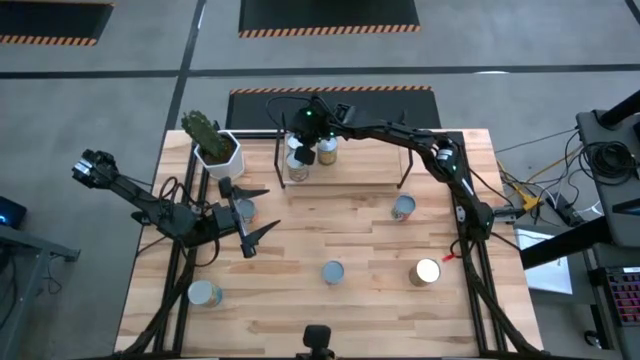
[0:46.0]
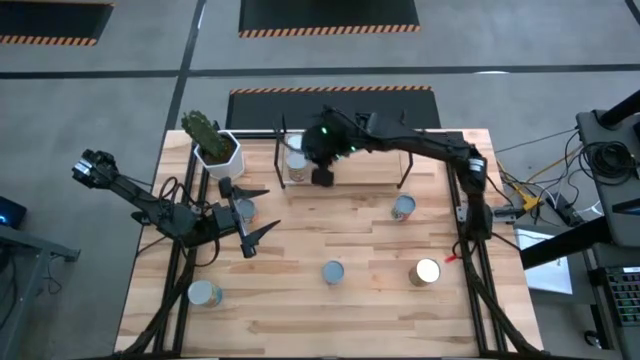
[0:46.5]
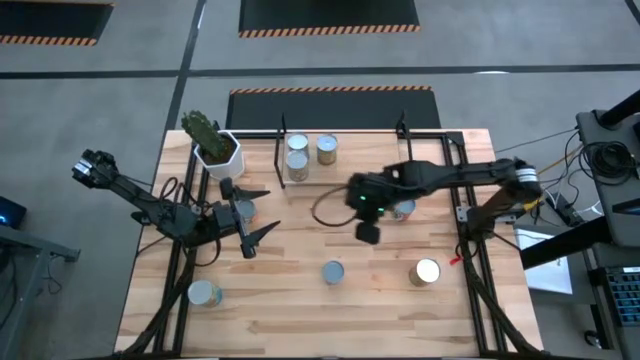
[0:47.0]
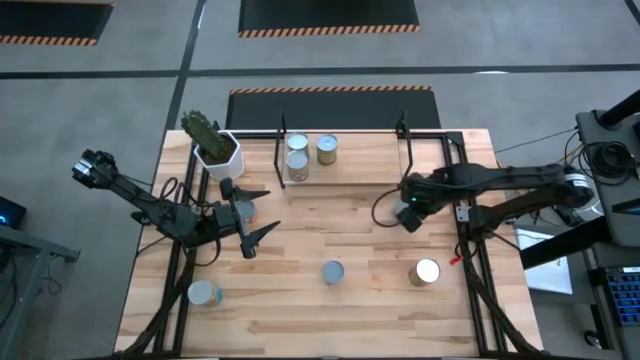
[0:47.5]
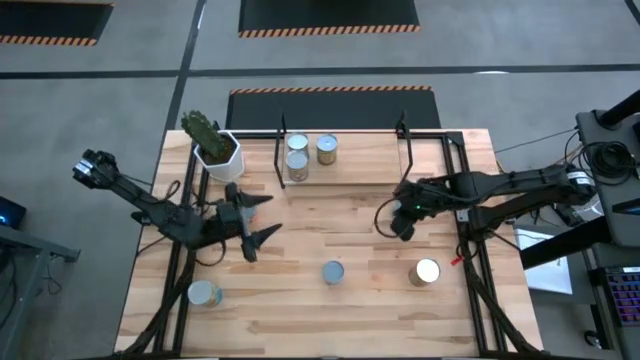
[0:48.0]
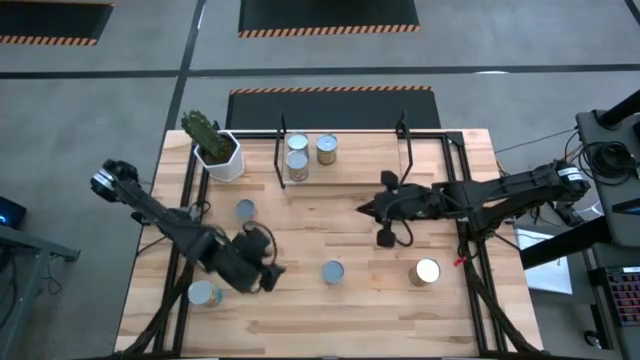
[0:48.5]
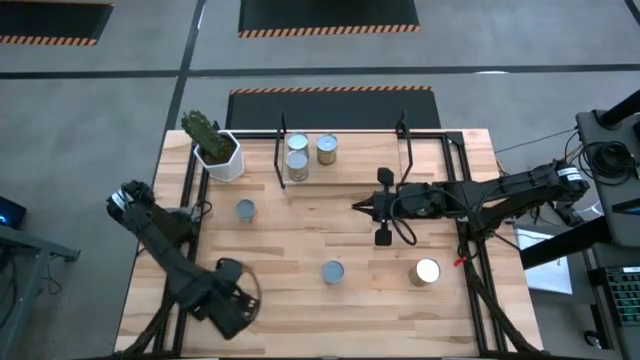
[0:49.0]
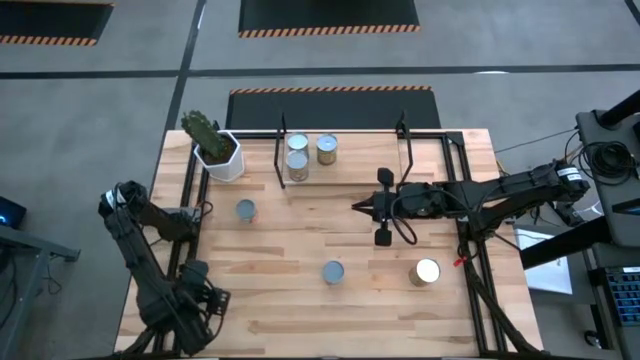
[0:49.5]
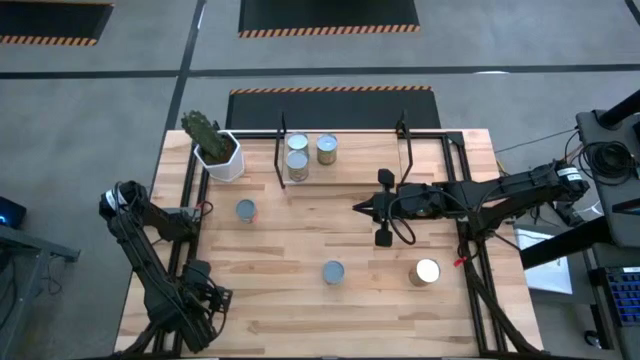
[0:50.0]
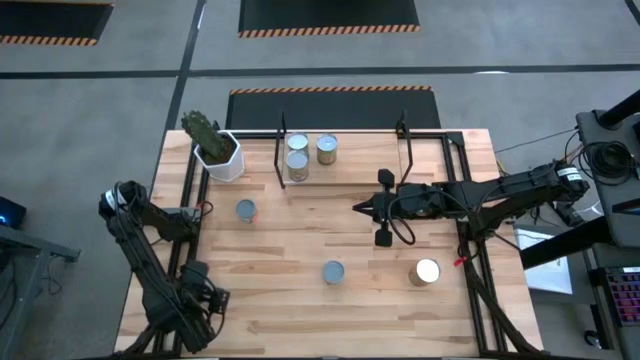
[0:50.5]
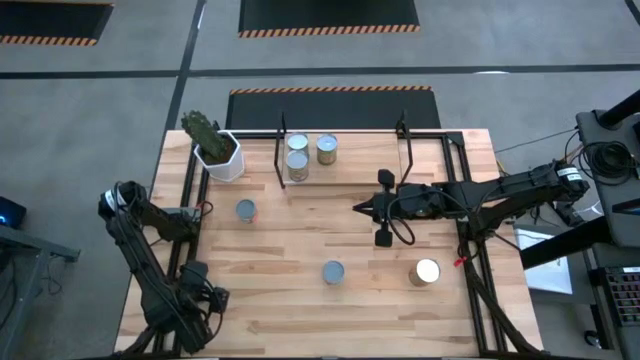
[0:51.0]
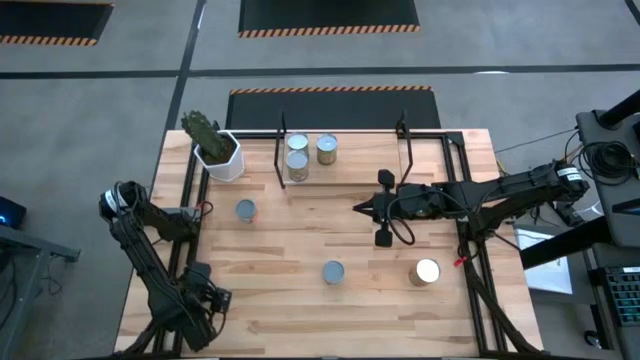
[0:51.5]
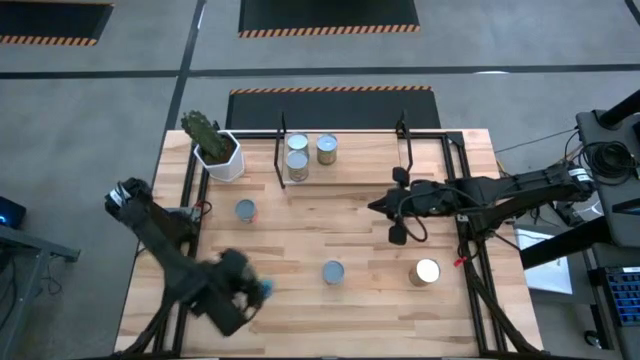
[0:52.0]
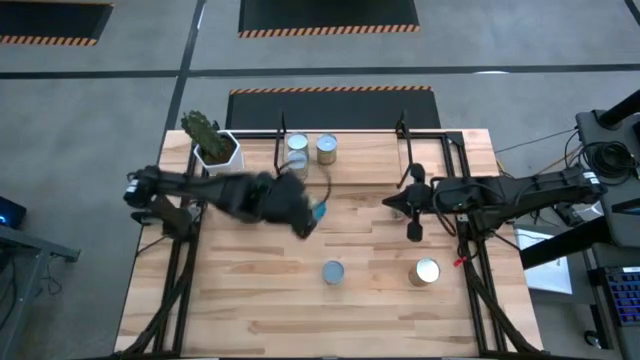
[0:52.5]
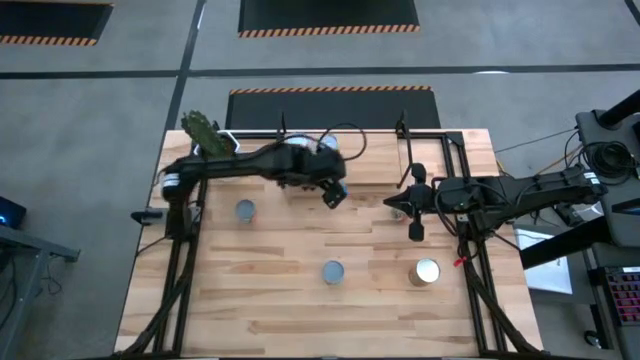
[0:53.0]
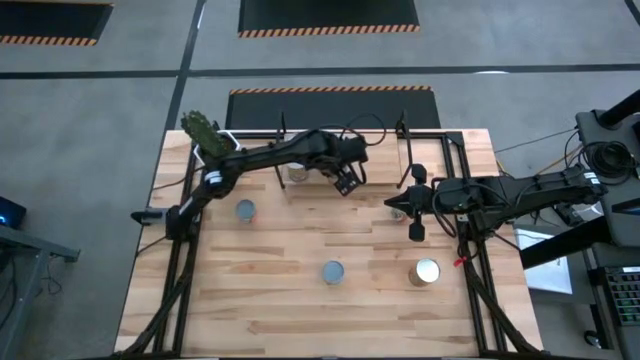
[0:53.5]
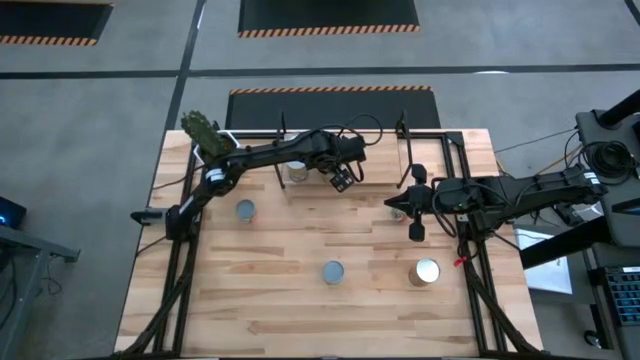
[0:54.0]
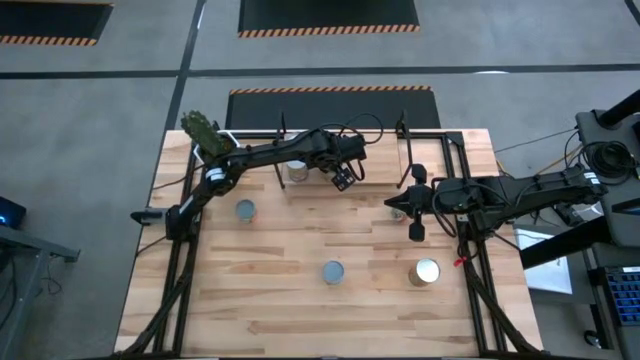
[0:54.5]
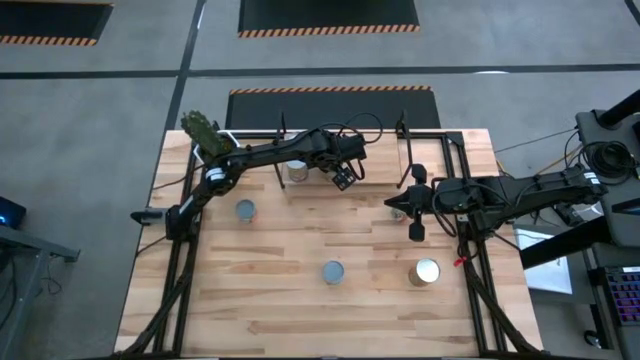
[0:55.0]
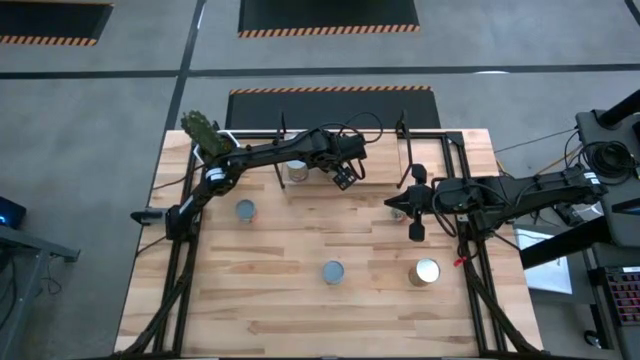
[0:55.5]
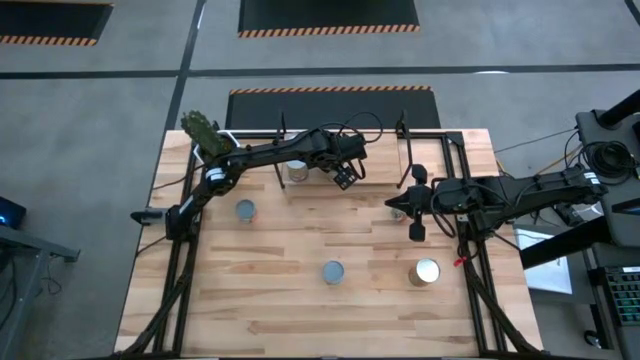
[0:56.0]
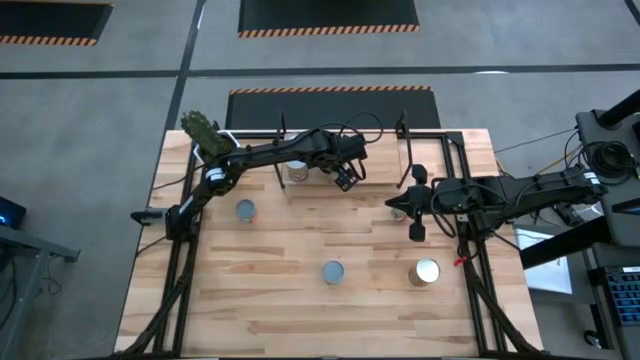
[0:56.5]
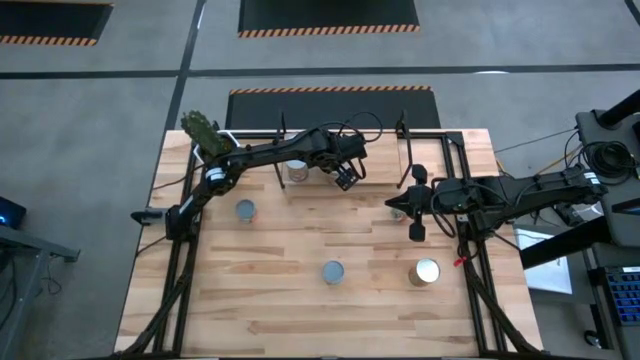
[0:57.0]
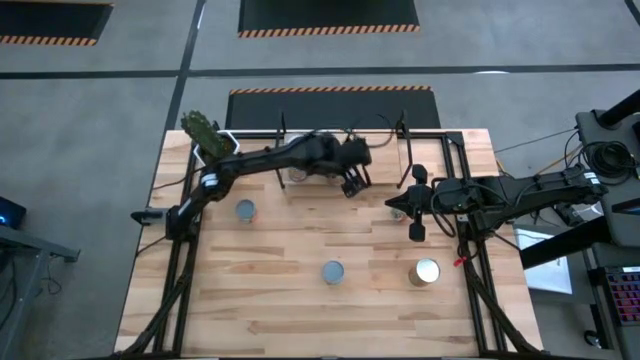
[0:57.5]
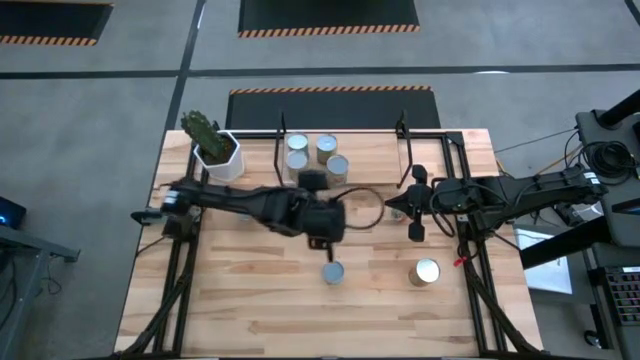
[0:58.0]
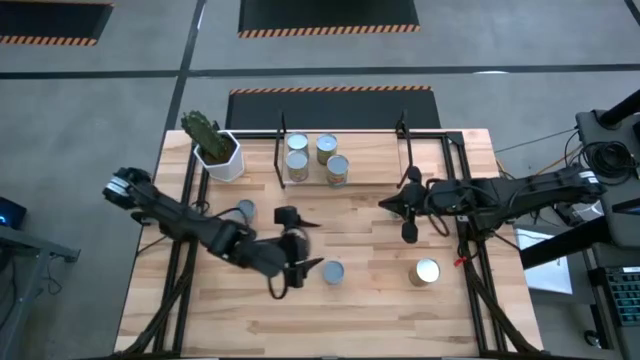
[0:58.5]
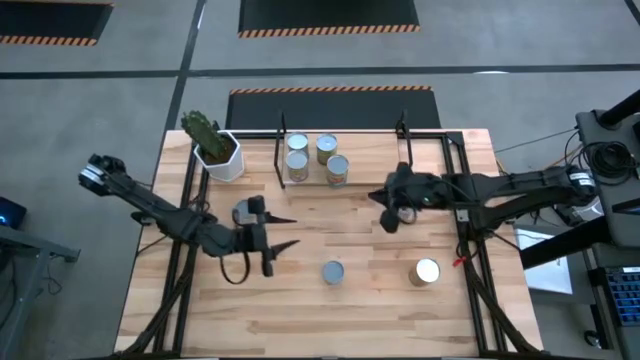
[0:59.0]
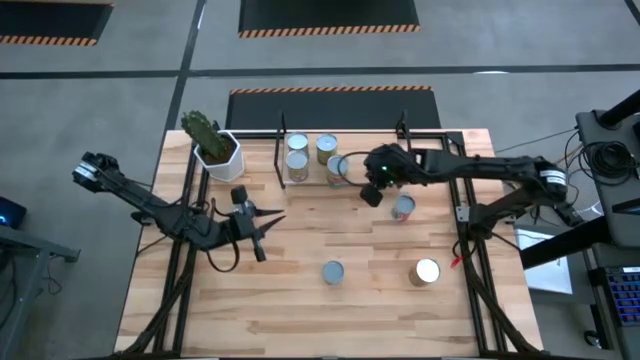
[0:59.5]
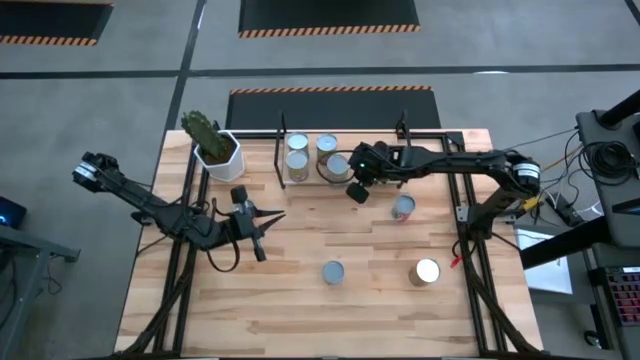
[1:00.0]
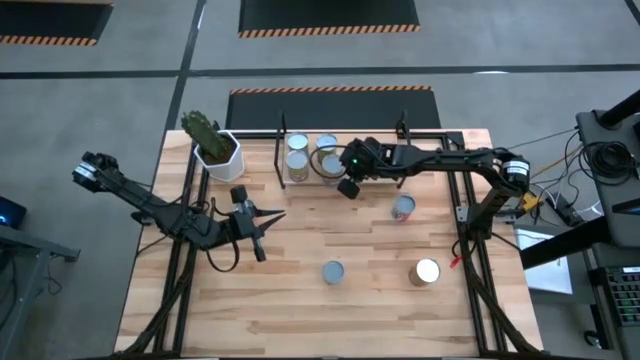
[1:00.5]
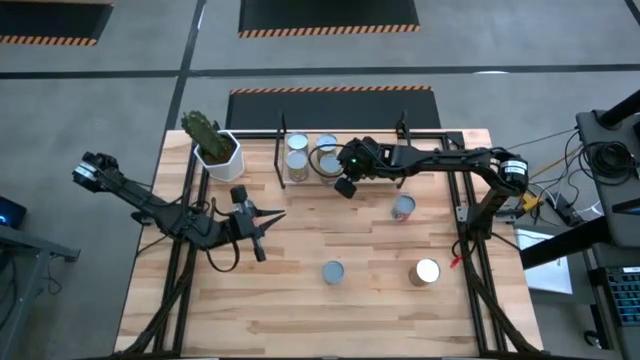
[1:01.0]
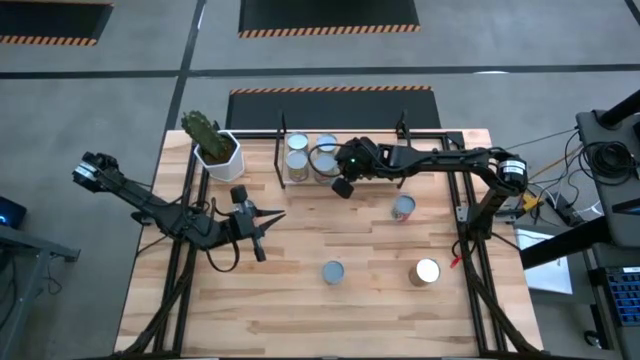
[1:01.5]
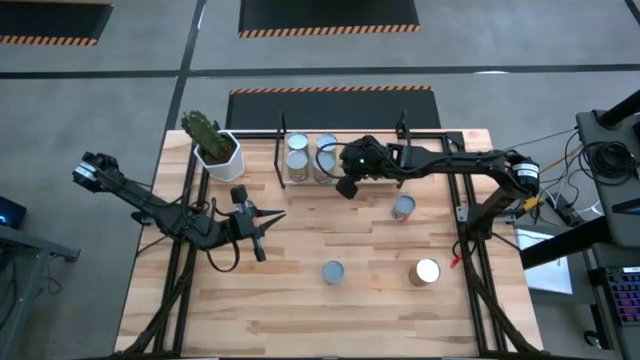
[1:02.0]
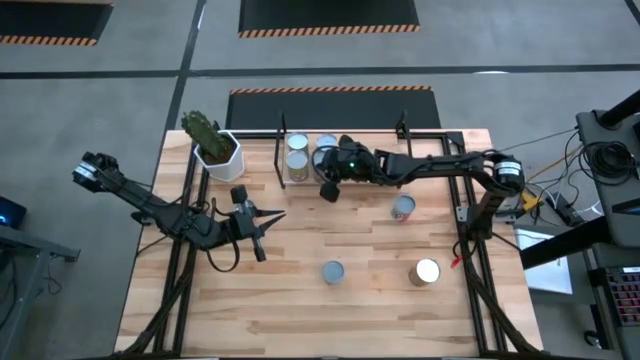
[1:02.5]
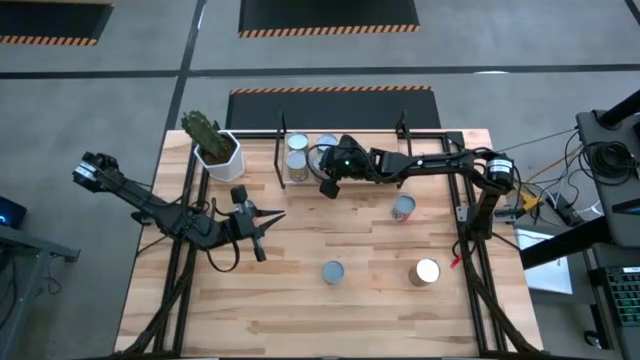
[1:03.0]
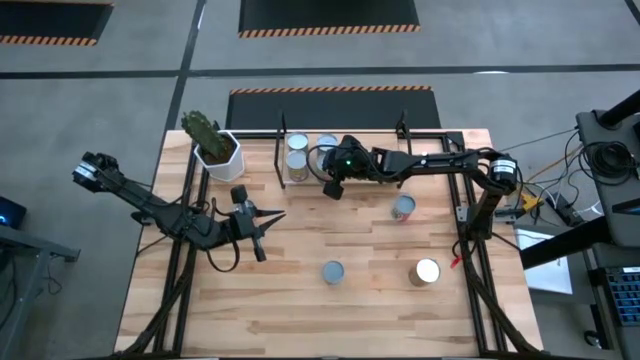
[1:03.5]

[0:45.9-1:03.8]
Task: Pick and place cans onto a shelf
Put the canned tomatoes on the shelf

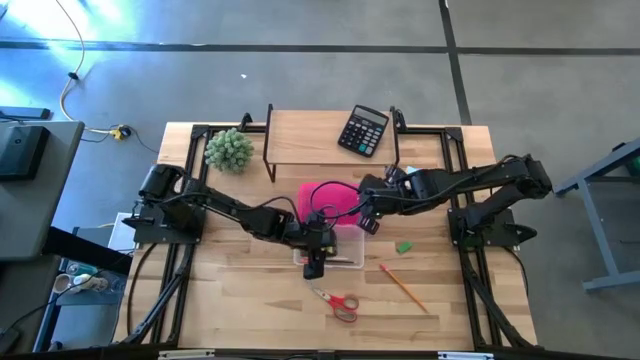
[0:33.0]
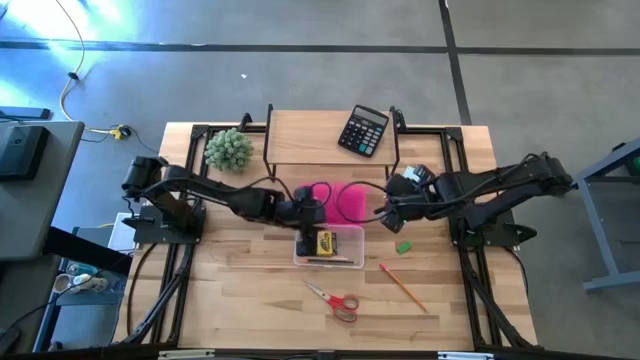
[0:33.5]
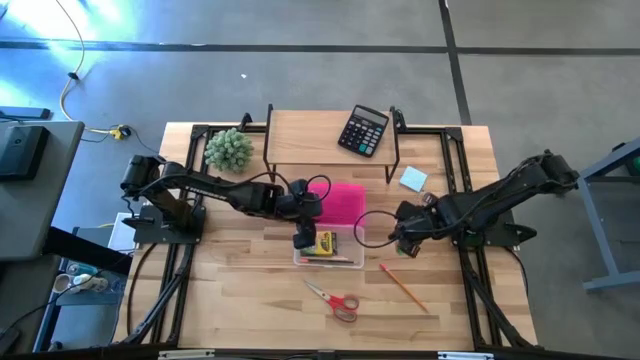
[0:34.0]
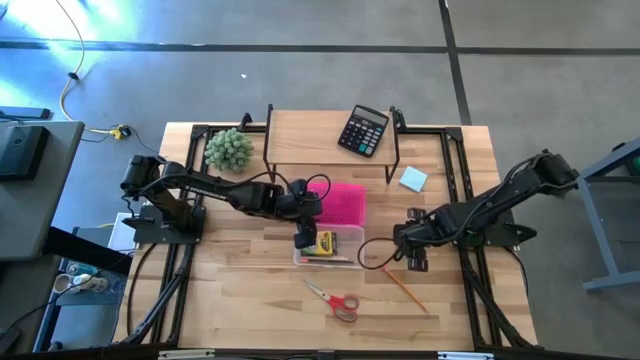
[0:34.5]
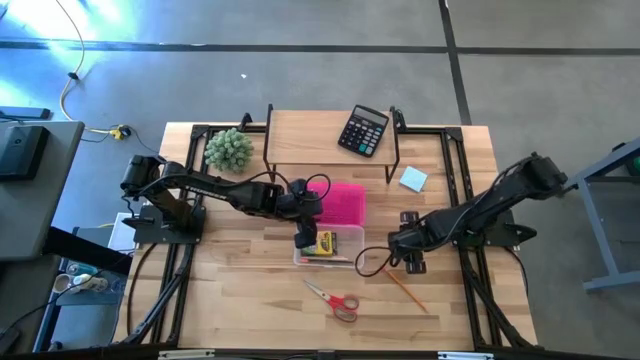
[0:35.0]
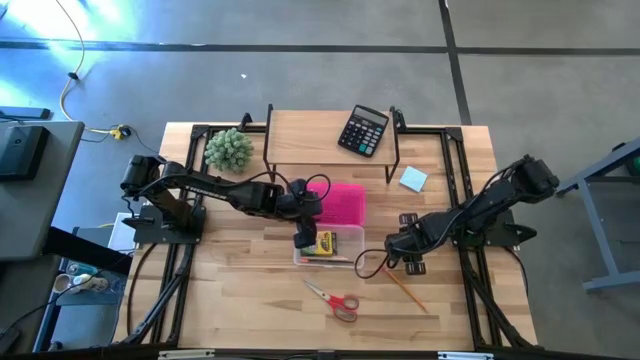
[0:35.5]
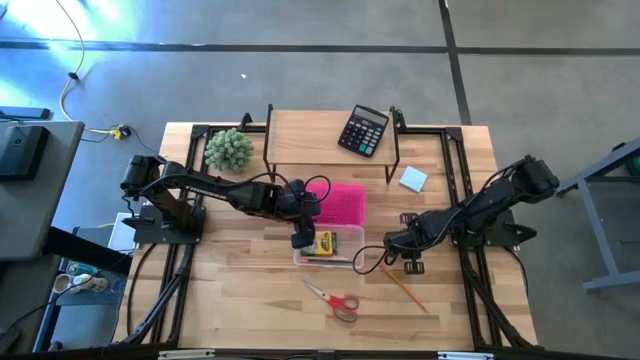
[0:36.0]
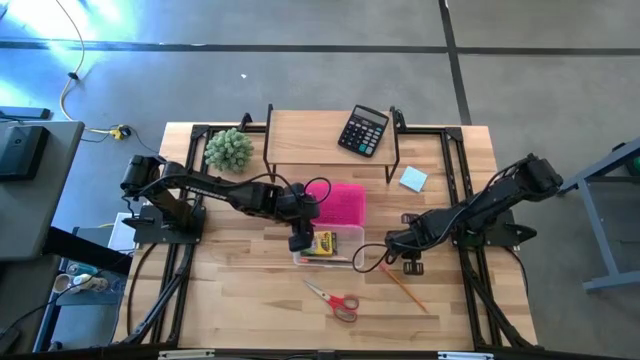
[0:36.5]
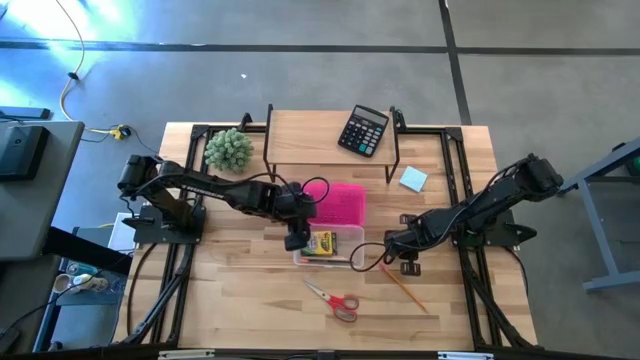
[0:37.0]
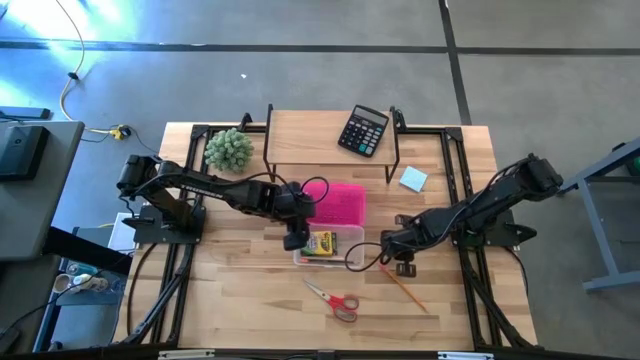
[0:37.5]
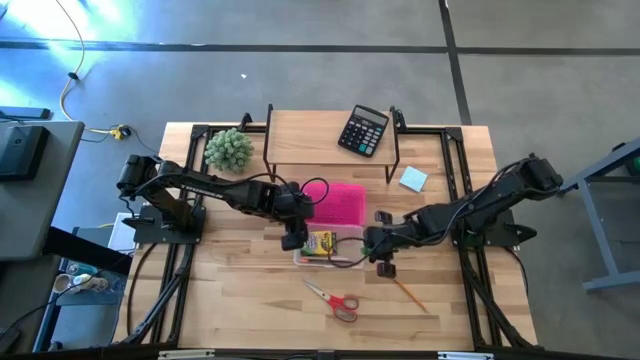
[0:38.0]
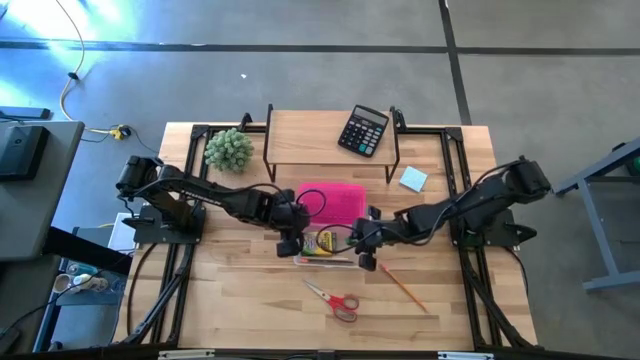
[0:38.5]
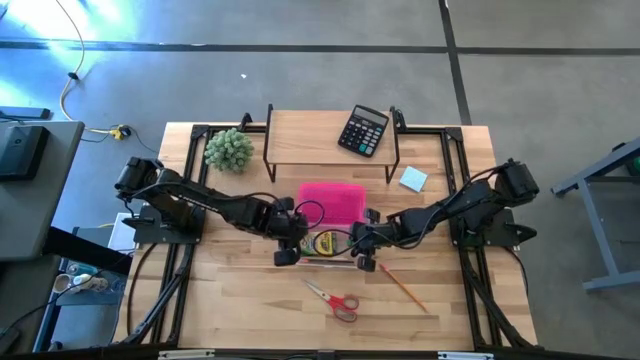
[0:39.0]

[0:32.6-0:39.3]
Task: Pack school essentials
Put the green eraser into the pink supply box
